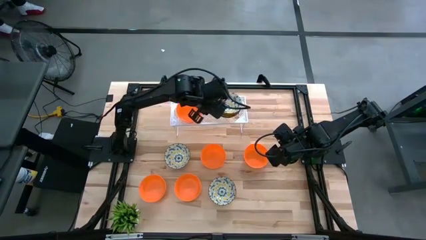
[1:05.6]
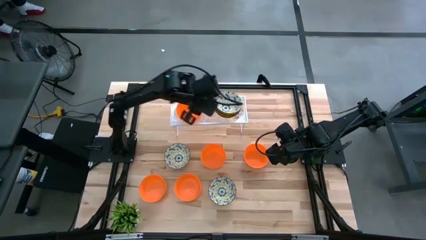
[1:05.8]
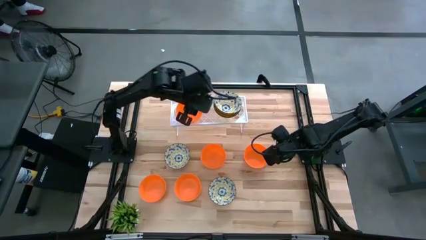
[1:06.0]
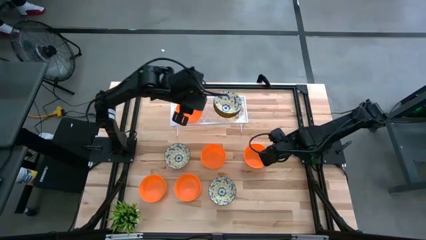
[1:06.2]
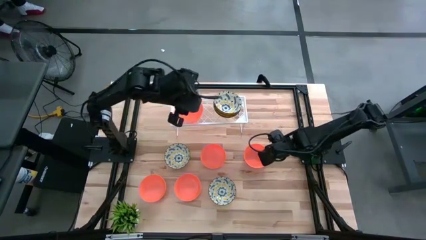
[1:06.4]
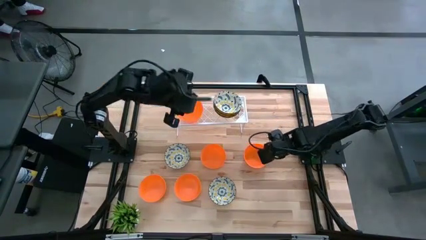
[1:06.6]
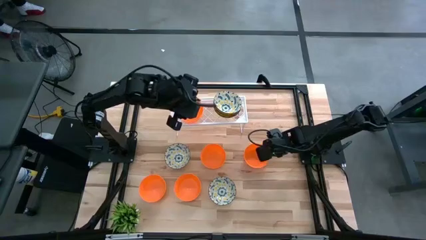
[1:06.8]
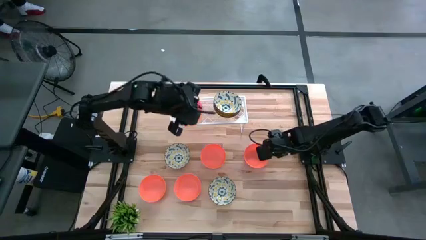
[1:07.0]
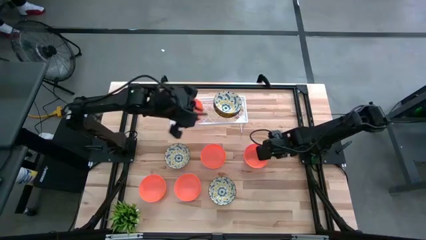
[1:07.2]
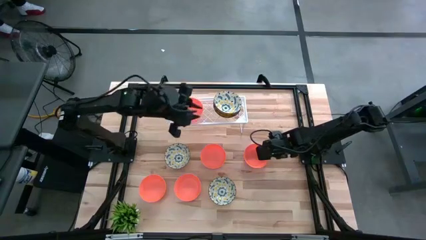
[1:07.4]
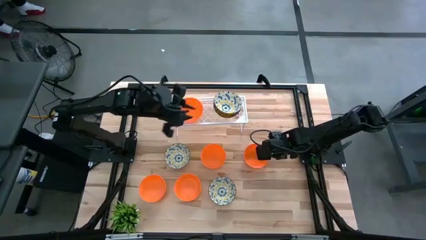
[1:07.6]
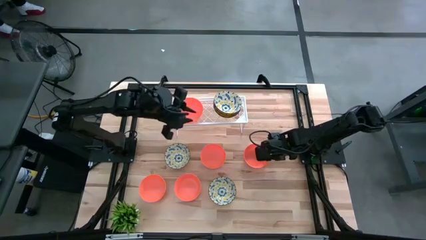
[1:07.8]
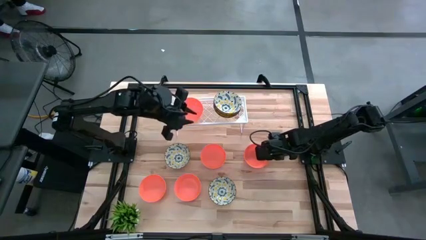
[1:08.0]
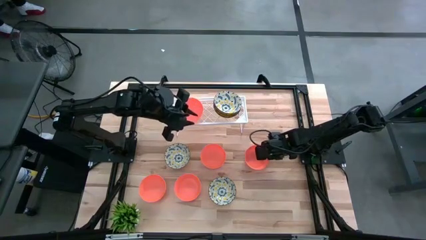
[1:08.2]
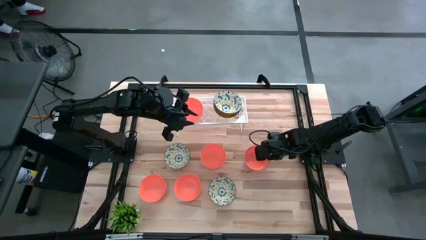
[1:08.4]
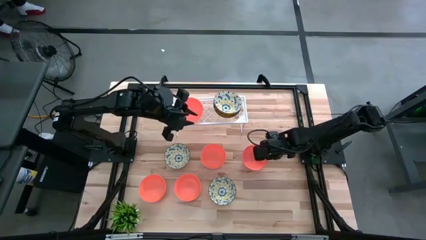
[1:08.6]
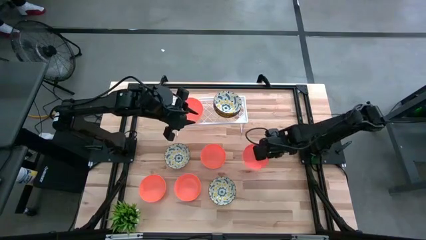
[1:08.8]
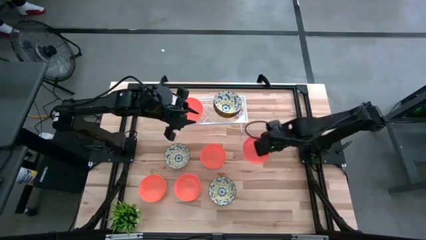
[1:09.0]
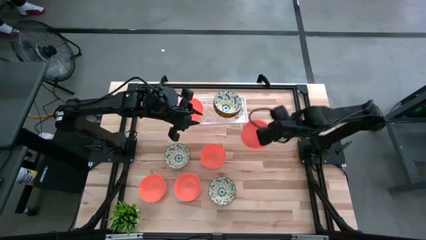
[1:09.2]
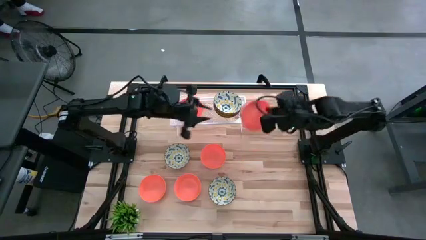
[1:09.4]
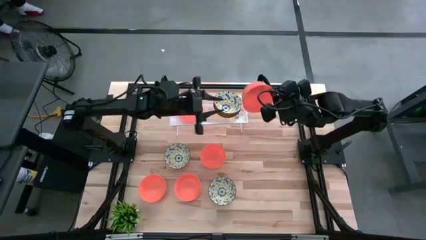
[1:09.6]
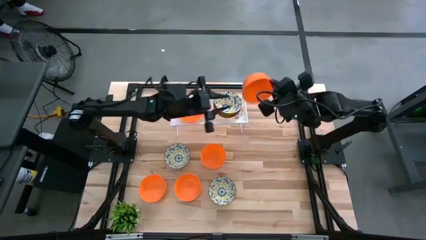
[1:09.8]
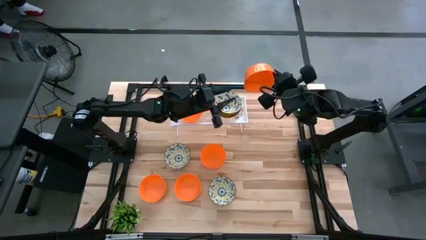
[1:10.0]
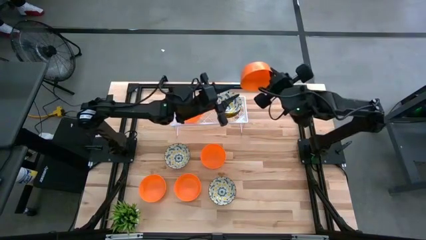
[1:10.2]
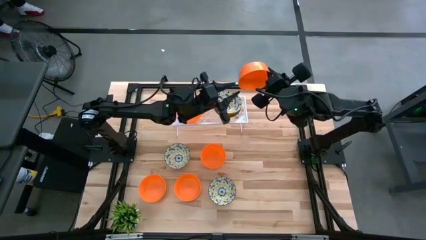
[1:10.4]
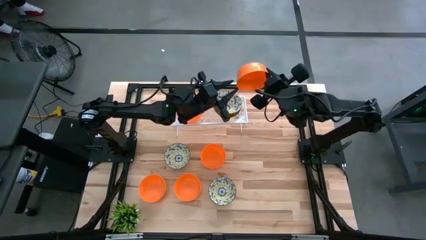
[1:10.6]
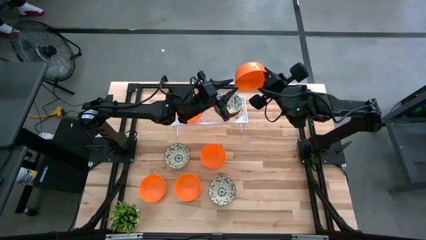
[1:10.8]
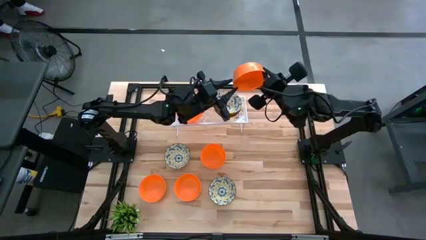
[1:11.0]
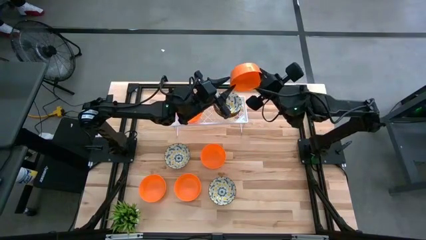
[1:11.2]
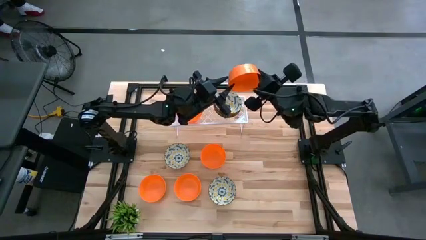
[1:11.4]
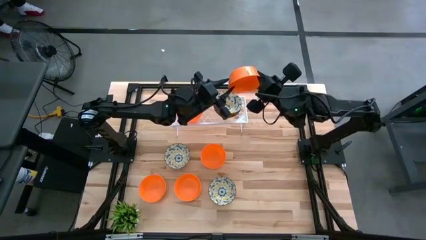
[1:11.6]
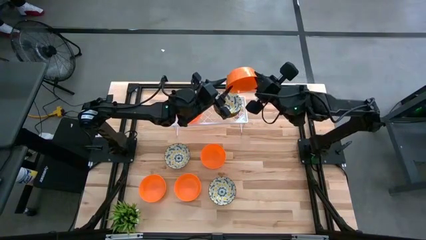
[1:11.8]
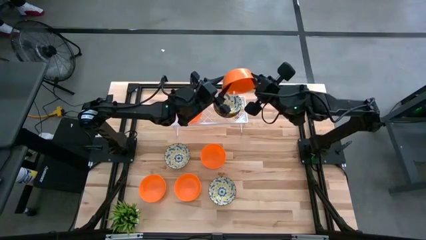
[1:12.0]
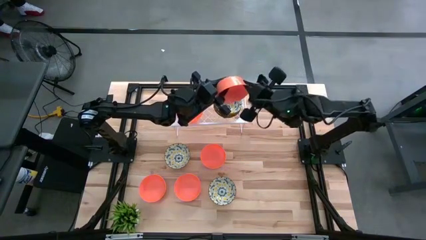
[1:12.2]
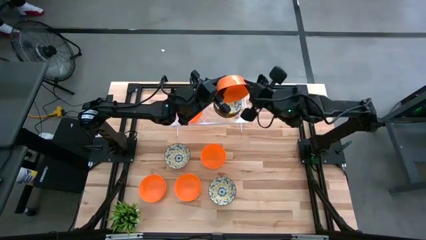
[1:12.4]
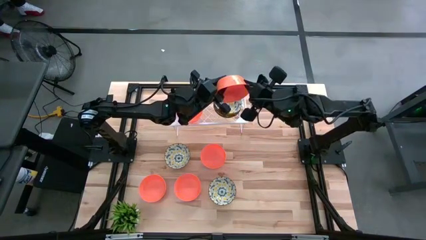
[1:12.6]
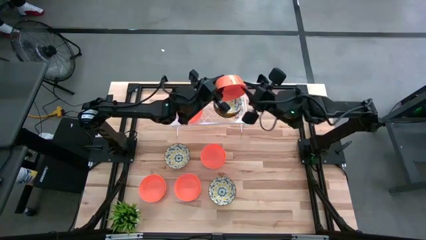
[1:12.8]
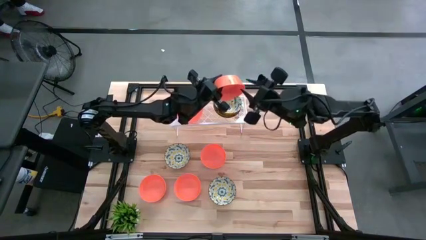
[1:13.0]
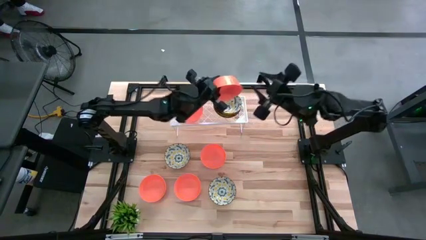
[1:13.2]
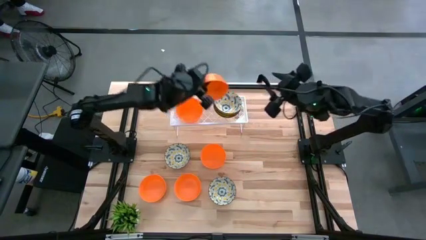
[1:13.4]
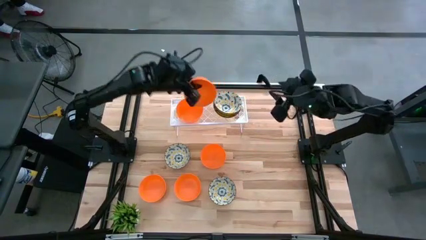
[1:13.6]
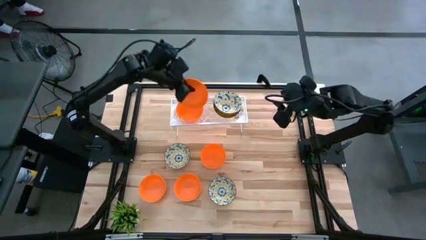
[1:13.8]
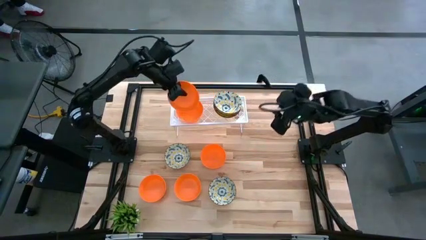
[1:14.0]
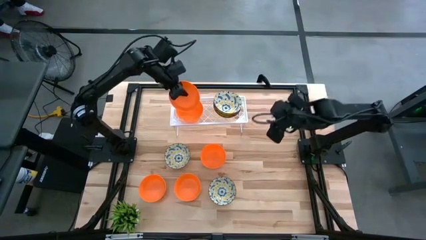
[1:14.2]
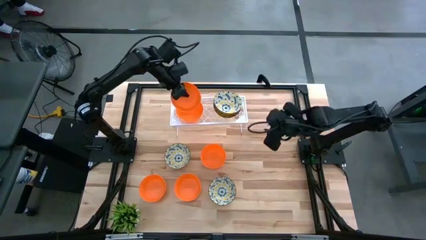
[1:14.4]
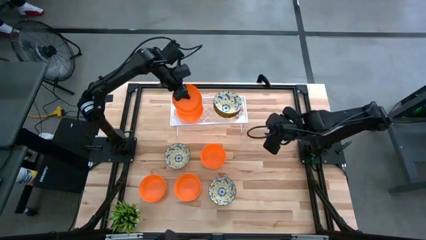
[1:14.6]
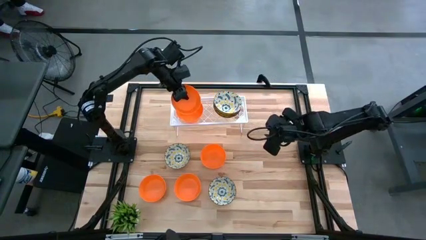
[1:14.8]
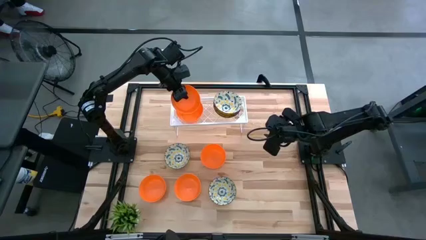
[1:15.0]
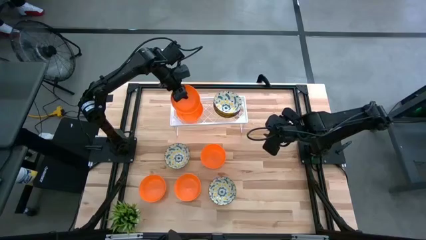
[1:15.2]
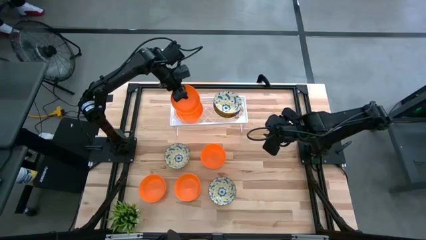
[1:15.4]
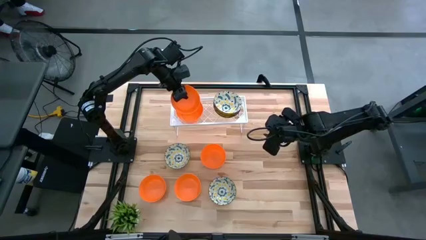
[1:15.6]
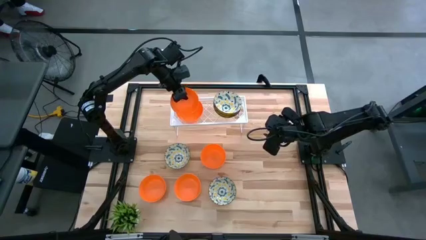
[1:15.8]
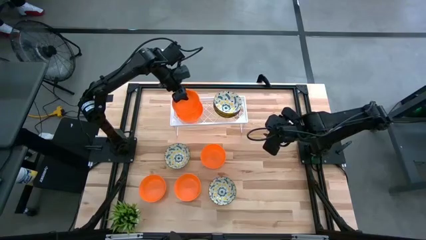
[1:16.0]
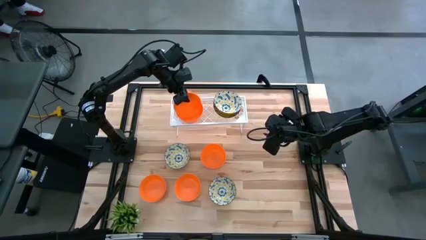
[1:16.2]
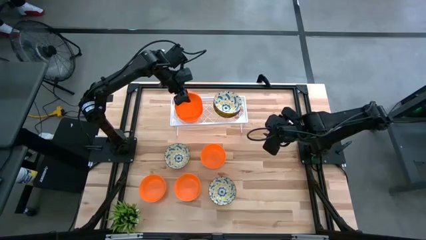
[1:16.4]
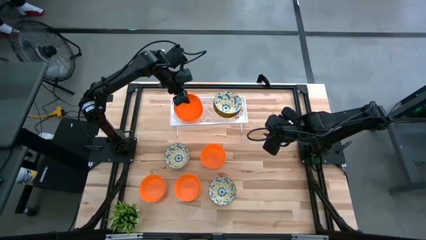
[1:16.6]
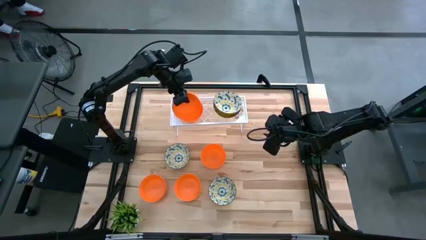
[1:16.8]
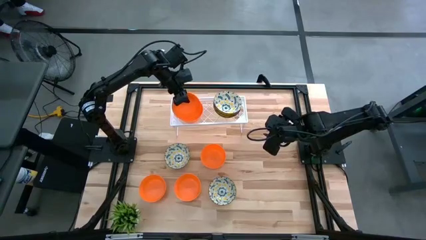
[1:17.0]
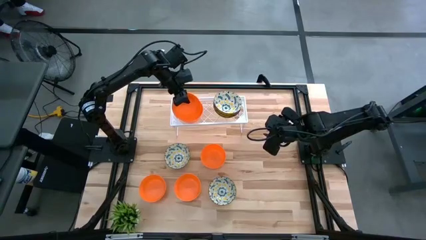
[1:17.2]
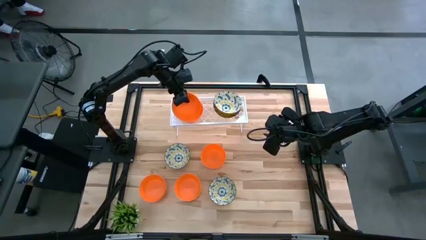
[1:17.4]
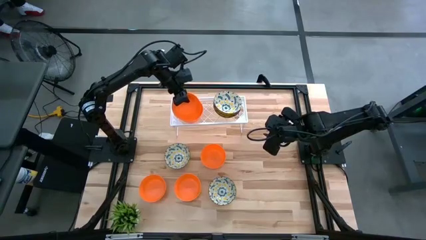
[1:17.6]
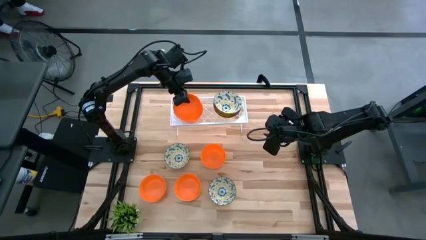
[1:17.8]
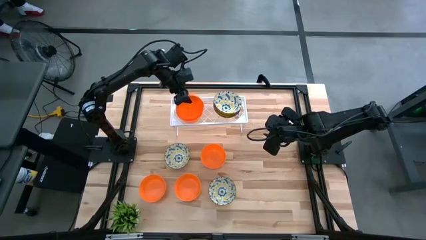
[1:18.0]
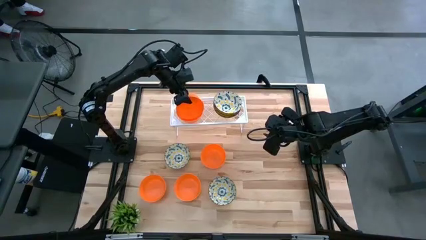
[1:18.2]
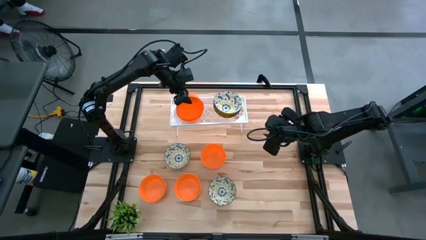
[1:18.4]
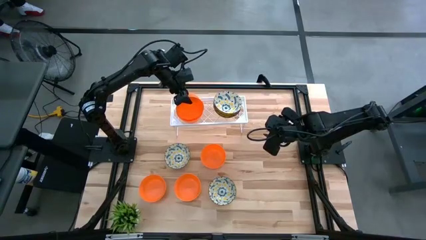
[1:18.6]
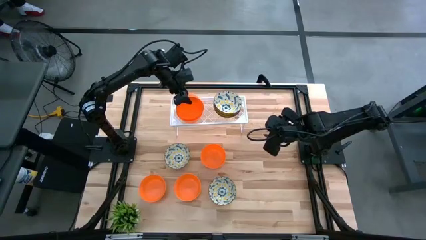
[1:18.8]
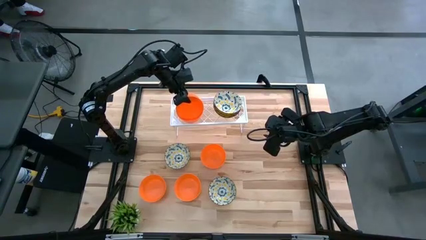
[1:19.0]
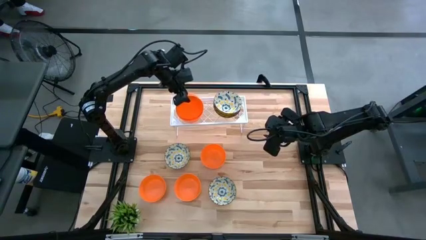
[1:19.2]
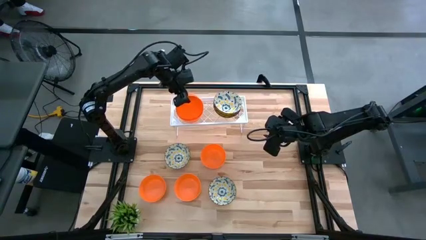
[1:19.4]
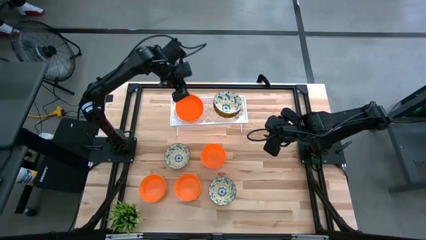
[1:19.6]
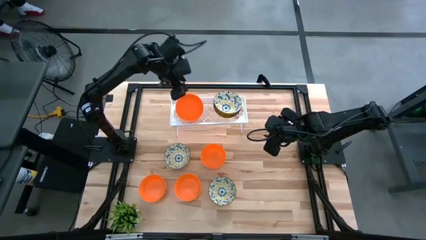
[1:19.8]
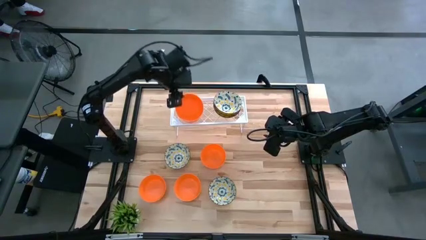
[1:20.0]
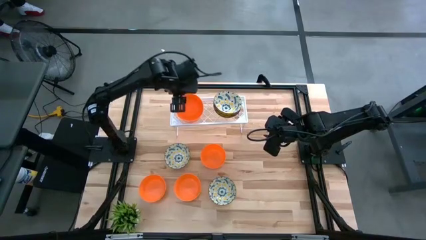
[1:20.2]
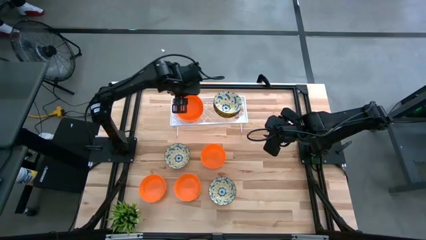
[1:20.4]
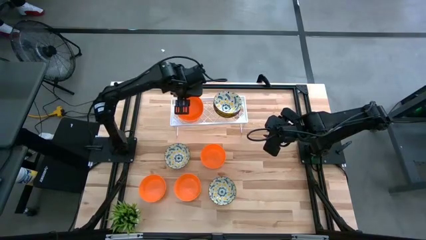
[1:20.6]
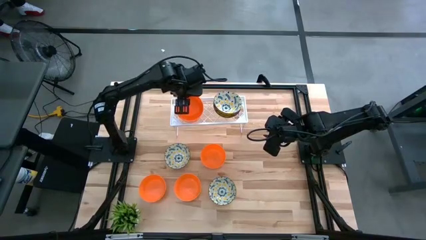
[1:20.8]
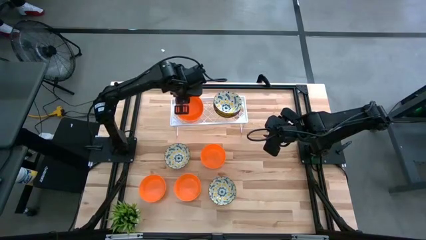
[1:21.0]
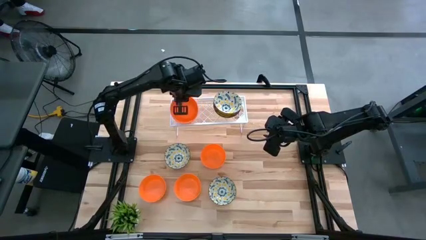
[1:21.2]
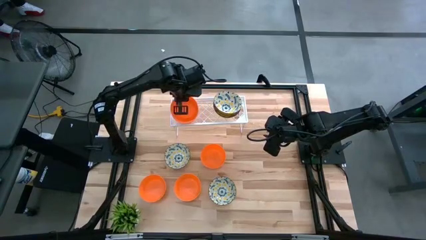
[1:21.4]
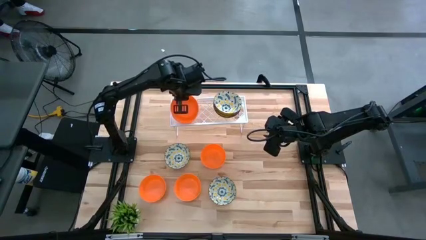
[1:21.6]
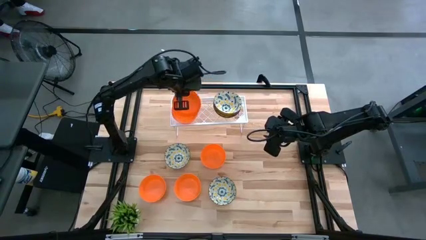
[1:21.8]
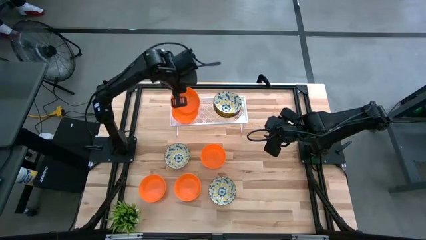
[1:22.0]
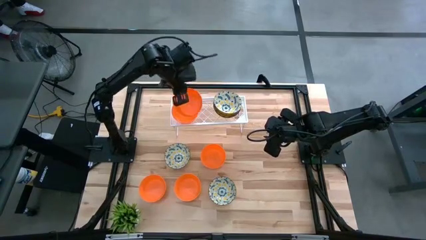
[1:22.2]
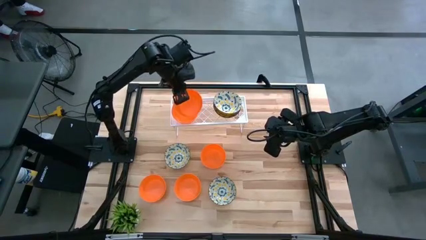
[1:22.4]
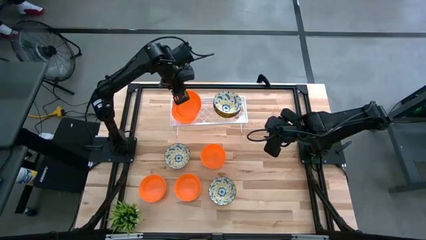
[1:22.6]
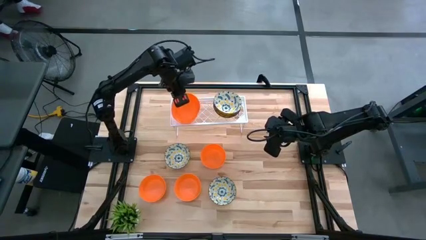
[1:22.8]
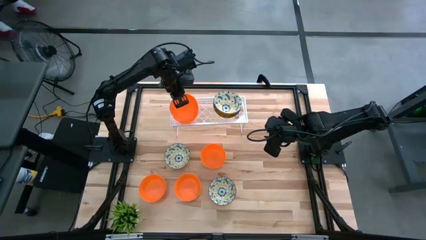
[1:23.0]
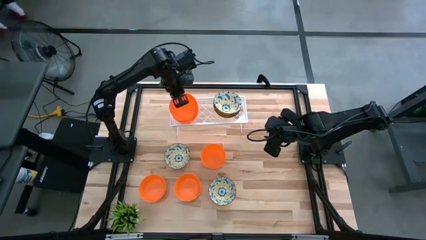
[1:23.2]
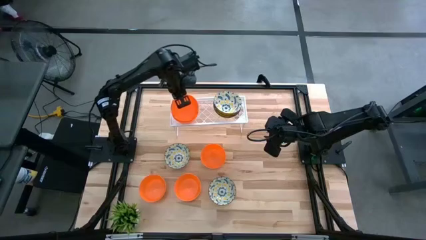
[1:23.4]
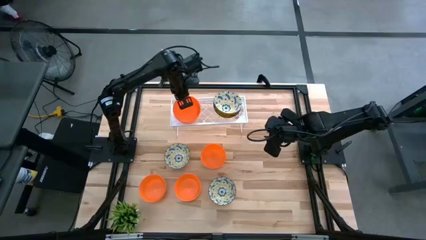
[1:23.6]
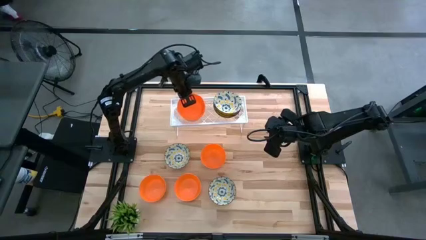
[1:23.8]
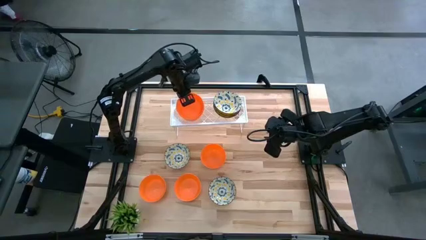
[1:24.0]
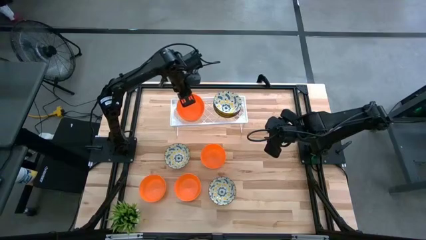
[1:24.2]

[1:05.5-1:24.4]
Task: Pick & Place Mini bowls
Stack the orange bowl on the other orange bowl on the shelf
